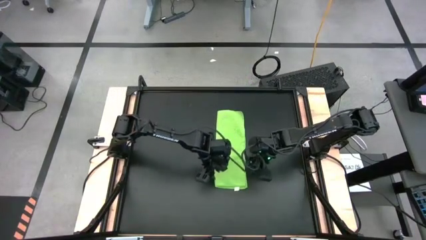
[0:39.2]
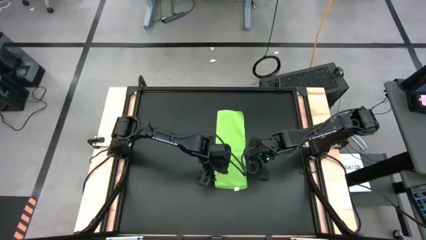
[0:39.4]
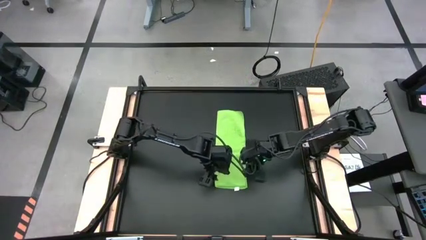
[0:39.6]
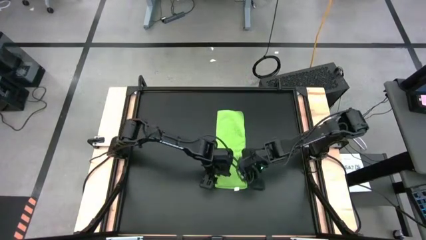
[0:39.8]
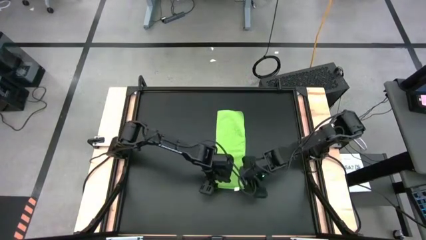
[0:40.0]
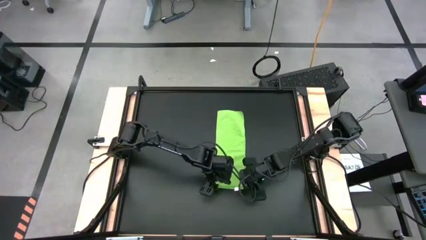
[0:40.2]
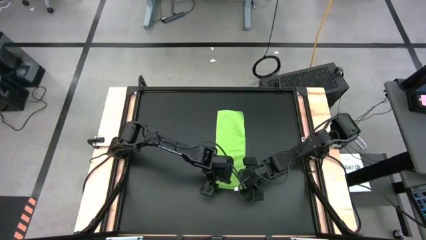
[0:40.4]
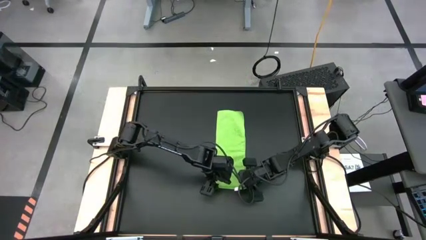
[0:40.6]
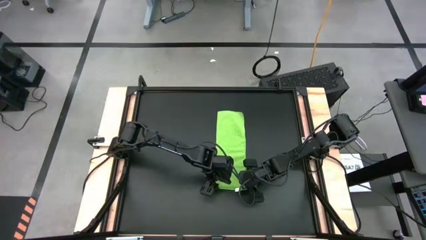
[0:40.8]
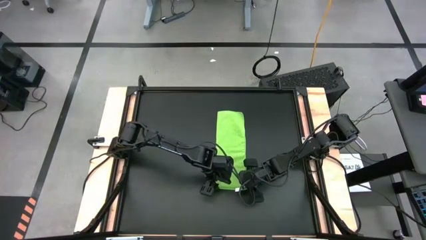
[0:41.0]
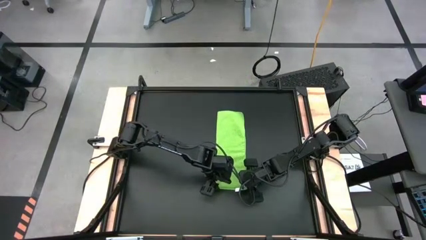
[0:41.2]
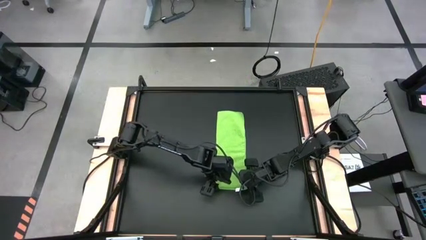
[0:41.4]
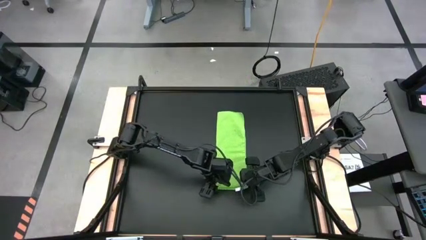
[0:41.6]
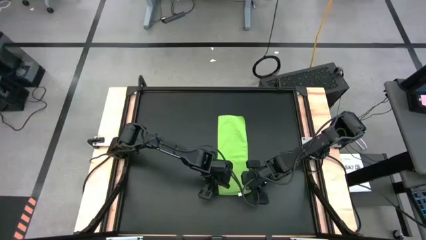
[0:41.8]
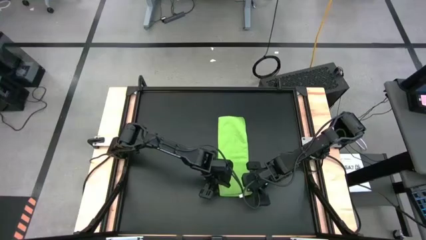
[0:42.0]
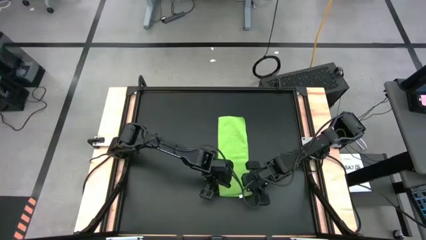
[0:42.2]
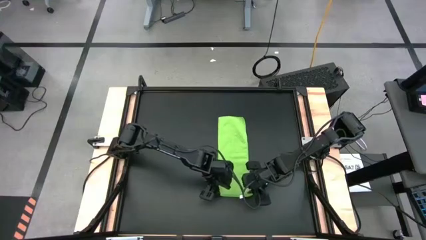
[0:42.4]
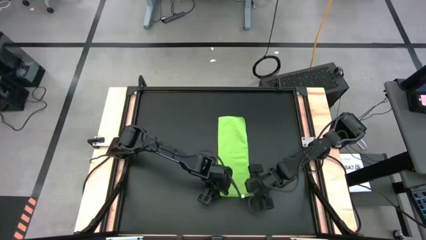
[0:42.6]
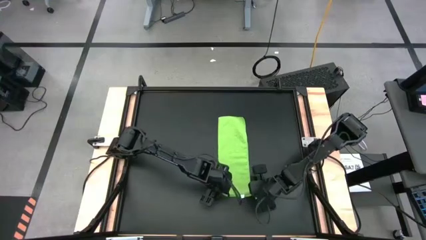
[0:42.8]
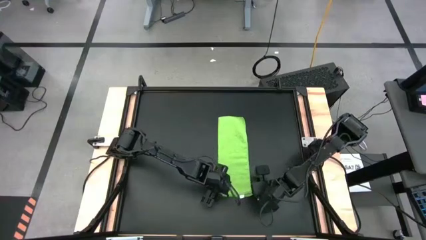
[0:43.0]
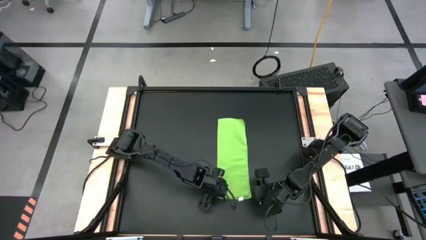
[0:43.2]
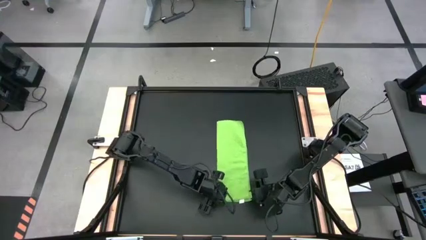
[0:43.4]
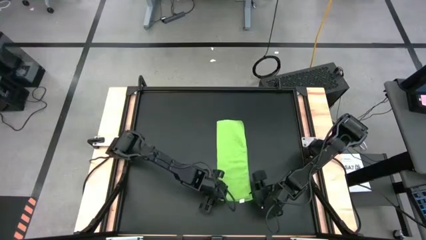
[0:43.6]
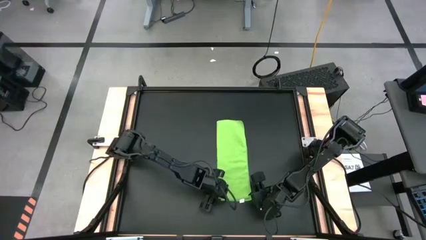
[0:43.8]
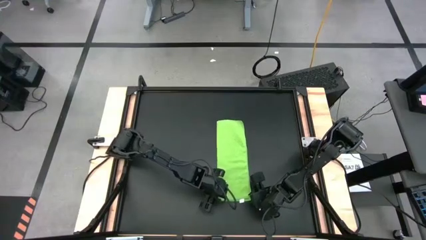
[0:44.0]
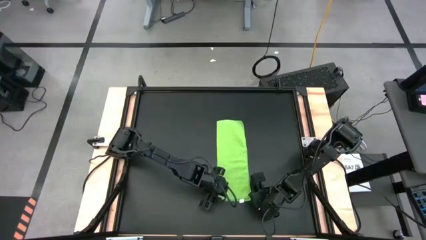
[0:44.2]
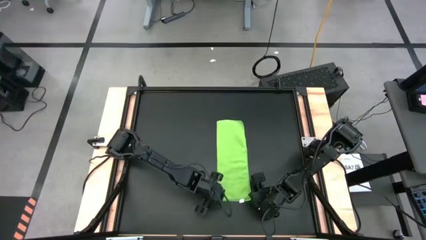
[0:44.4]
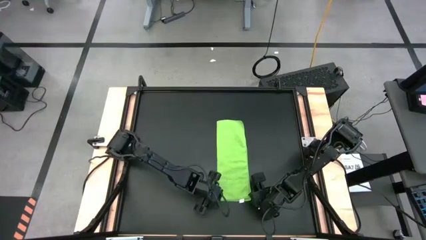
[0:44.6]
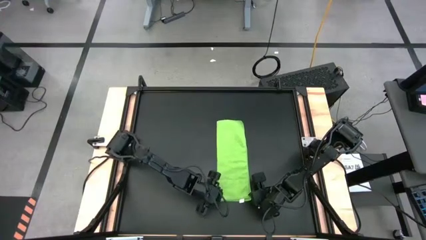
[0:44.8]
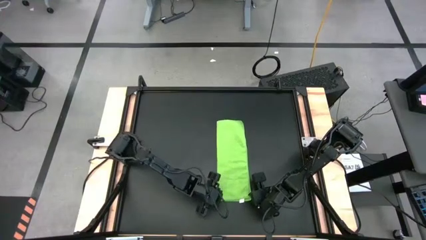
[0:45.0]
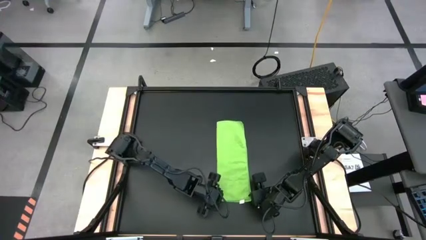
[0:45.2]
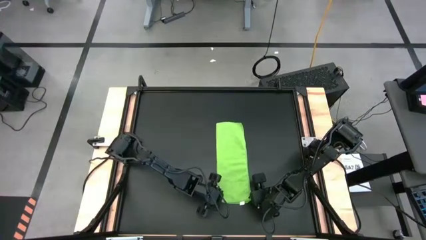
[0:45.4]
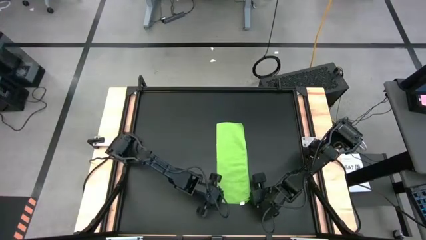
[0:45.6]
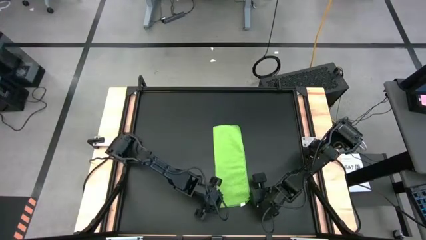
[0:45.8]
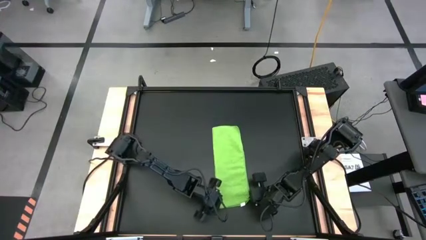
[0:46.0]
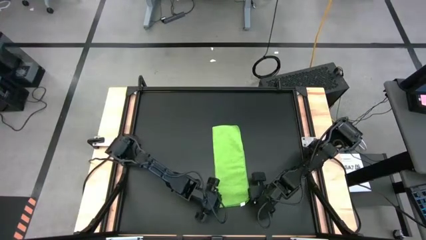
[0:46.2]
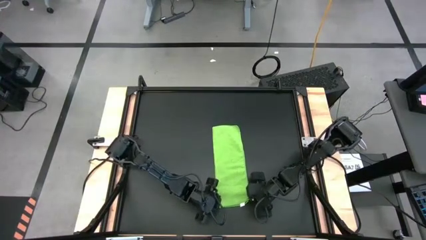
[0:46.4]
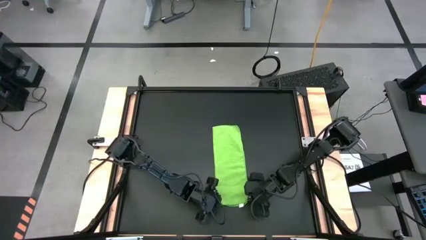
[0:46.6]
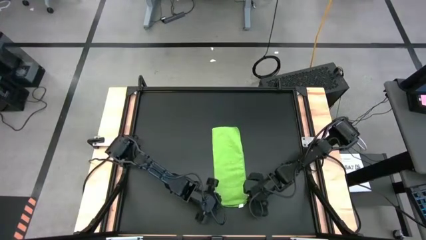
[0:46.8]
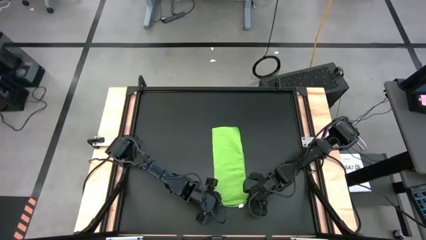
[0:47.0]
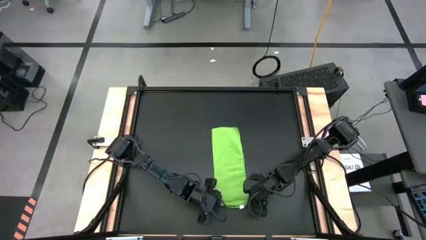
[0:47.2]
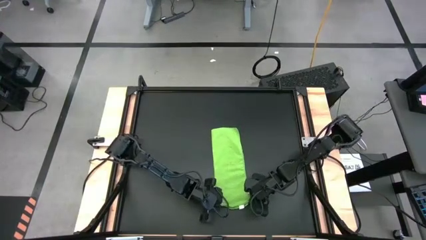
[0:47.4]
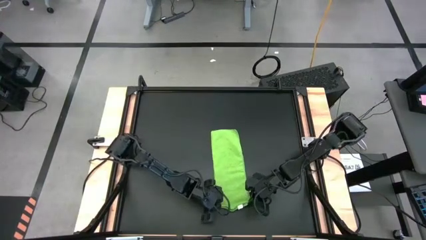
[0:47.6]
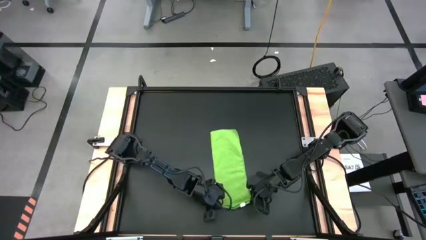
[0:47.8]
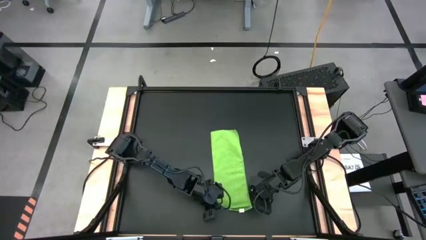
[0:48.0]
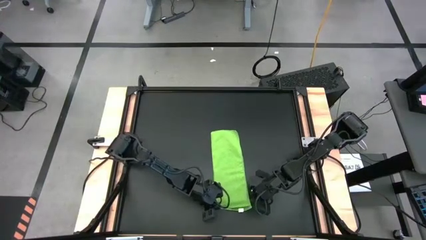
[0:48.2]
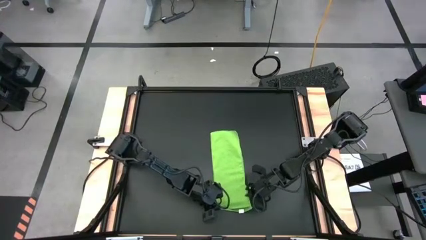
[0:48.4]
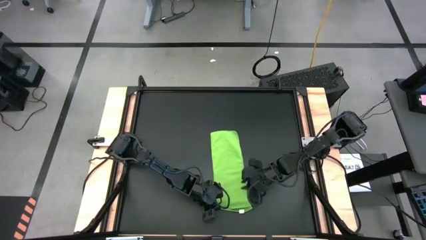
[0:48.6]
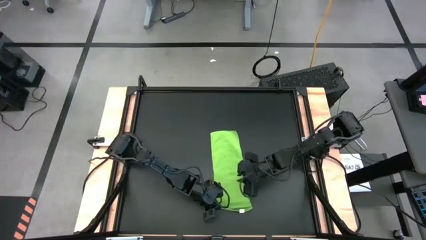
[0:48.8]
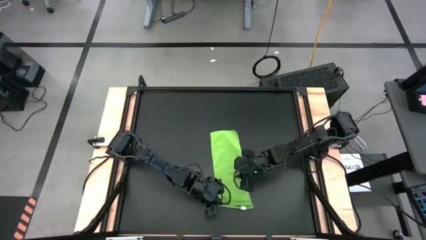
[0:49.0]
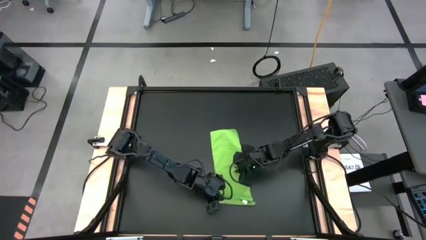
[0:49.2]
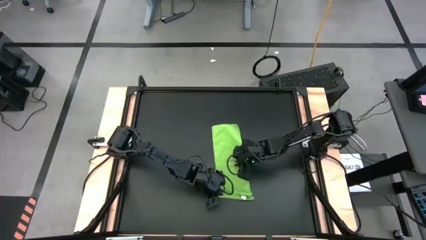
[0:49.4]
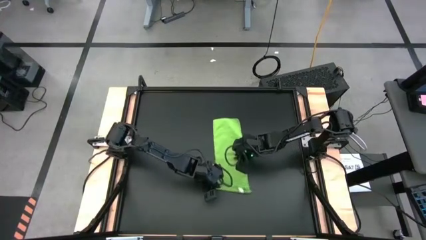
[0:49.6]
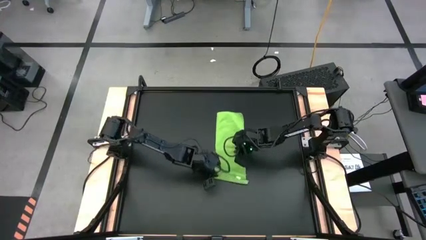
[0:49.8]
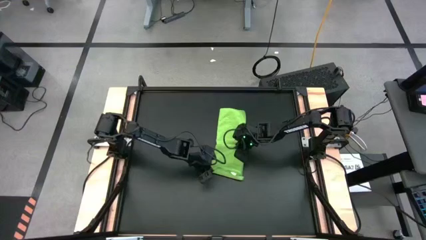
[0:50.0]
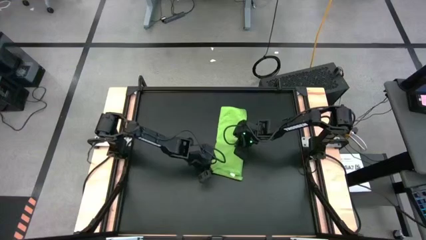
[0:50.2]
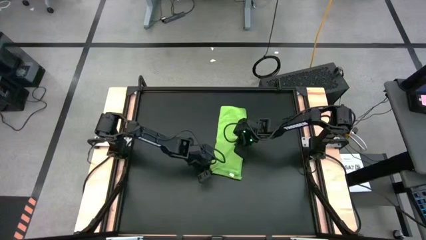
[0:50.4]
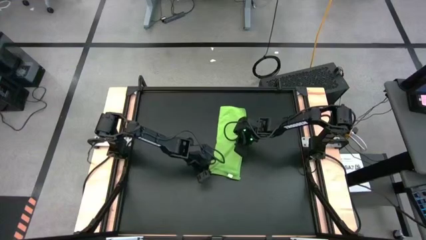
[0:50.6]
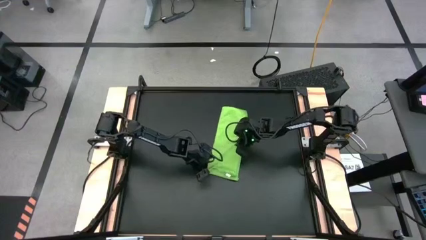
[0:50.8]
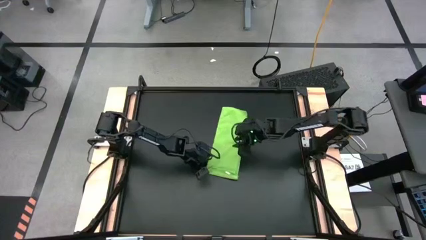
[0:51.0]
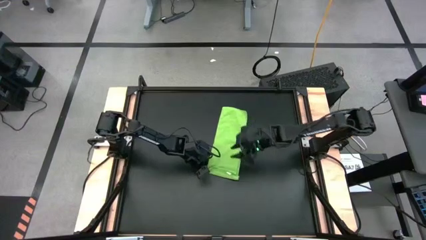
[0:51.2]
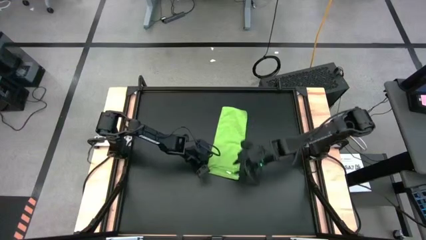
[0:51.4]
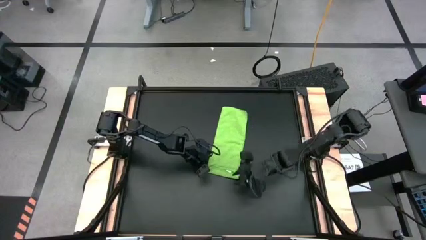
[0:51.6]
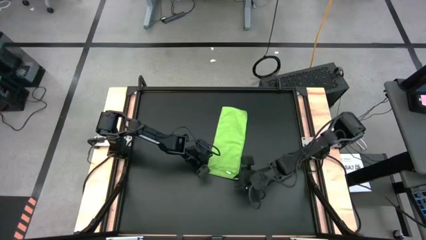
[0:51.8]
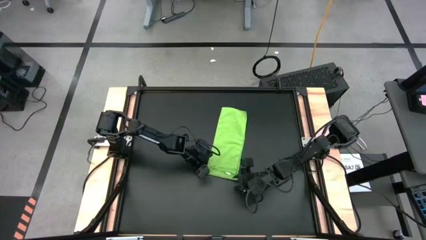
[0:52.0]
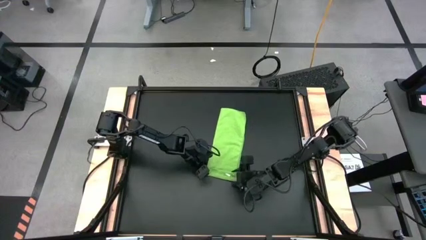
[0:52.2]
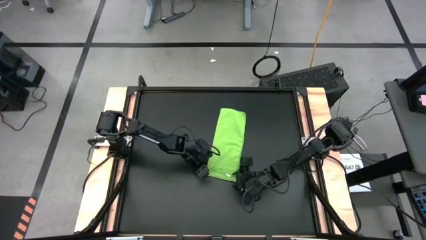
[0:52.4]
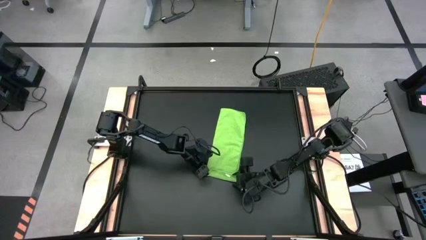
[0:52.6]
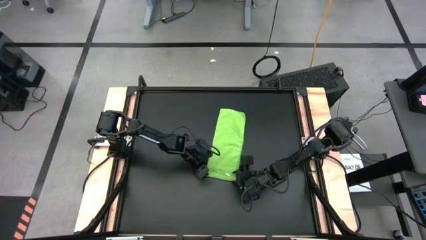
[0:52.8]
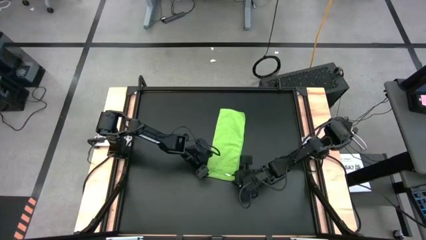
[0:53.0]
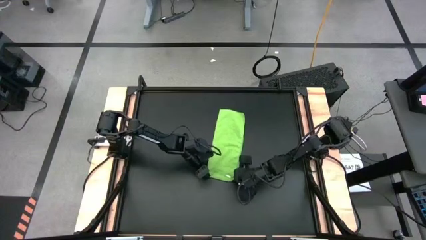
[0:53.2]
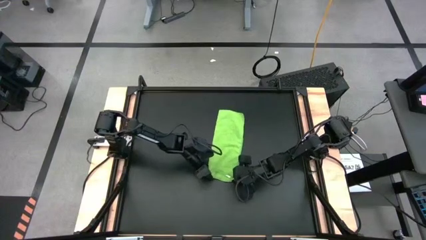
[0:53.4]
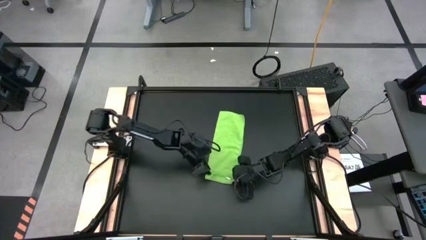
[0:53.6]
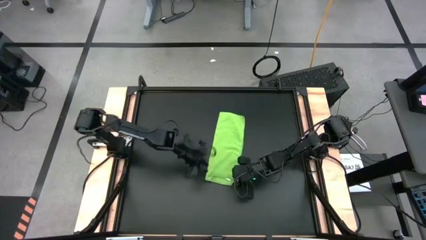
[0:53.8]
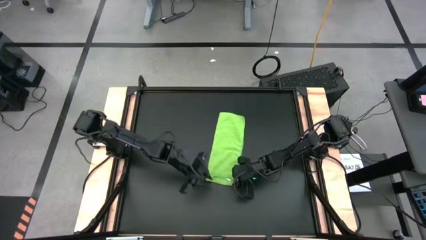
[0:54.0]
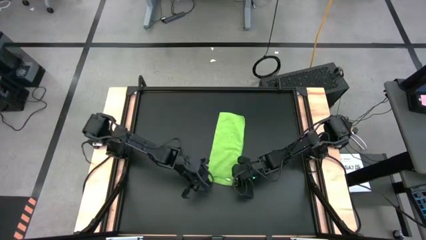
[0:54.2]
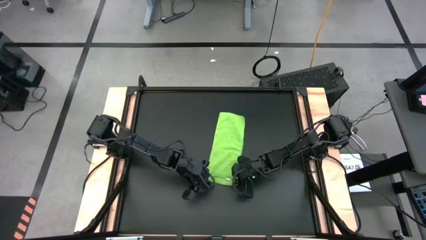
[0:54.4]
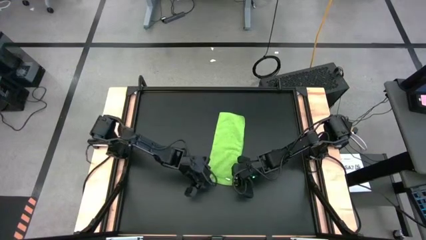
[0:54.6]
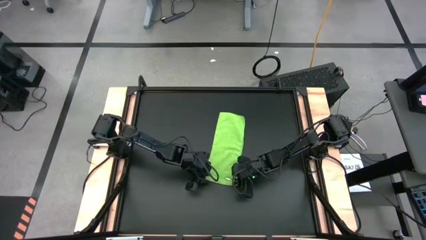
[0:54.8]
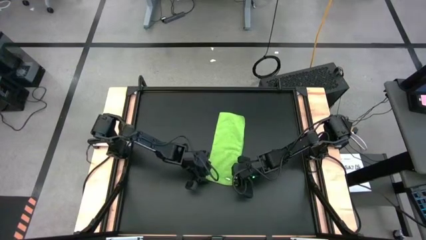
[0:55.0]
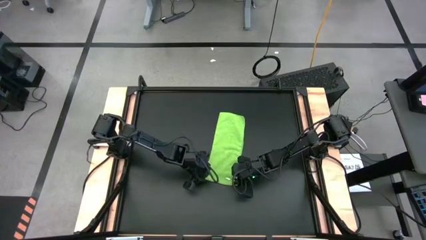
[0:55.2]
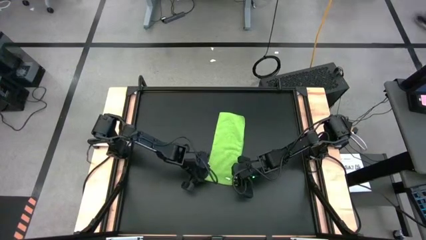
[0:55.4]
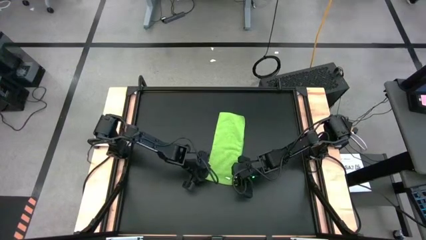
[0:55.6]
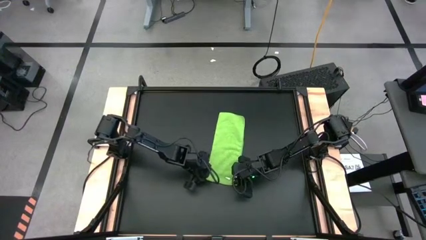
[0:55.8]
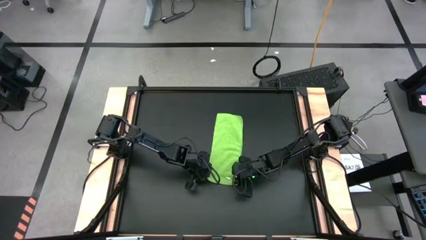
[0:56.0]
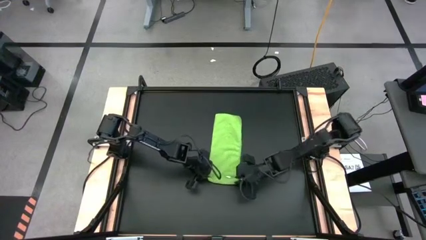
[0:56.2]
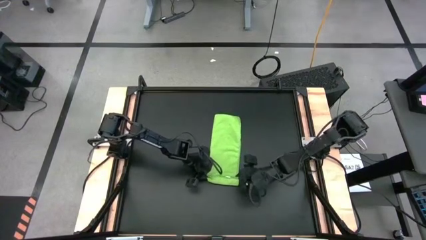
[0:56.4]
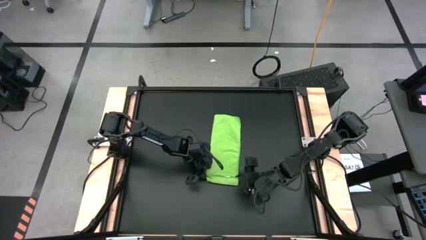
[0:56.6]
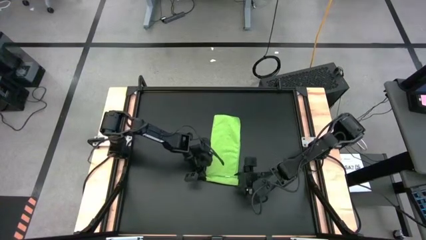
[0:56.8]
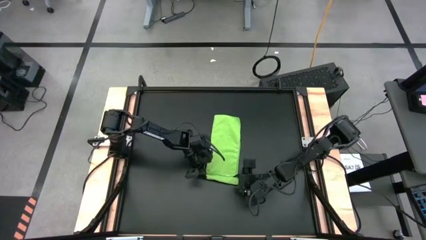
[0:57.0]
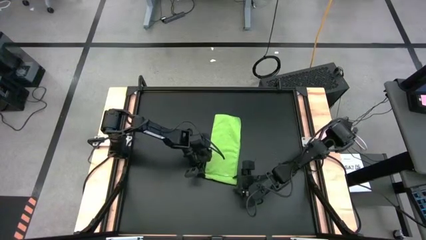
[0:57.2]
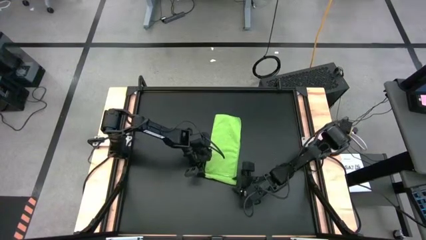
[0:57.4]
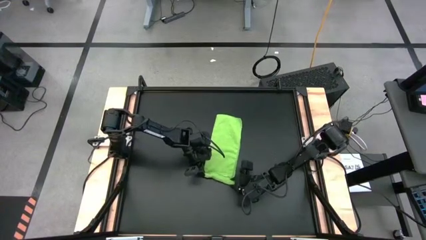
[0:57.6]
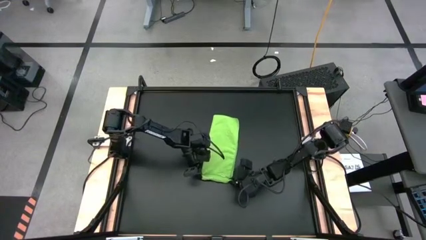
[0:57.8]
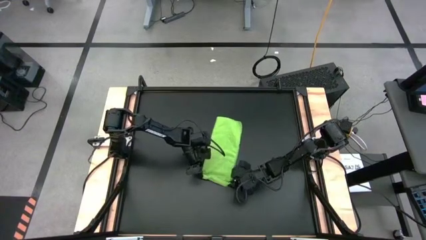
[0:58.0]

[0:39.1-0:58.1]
Task: Roll towel into tight, uniform cylinder
Roll the green towel
